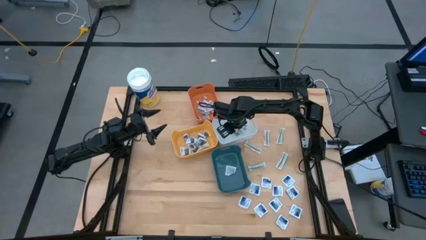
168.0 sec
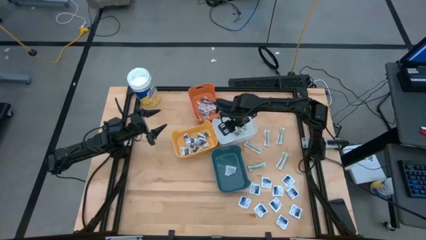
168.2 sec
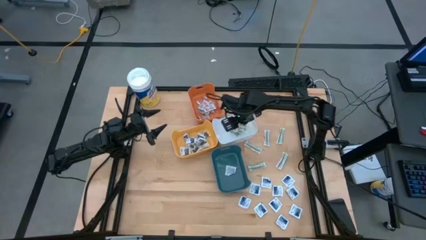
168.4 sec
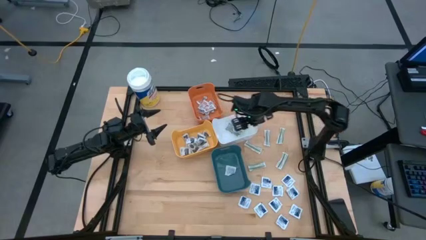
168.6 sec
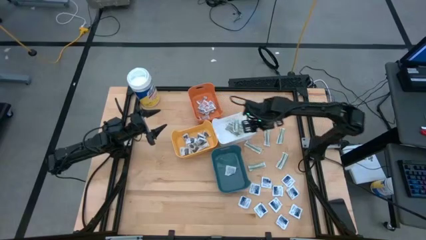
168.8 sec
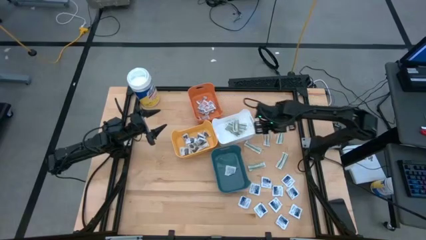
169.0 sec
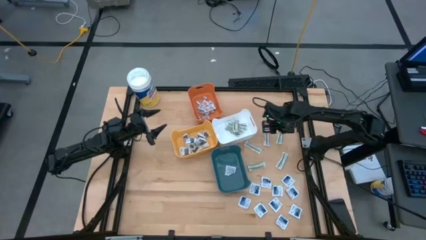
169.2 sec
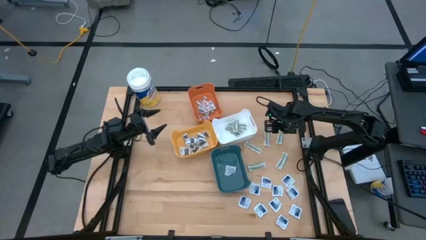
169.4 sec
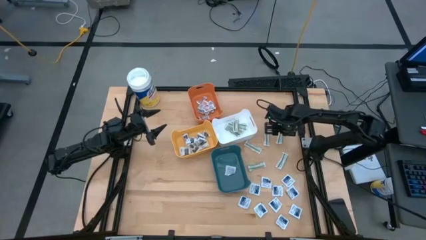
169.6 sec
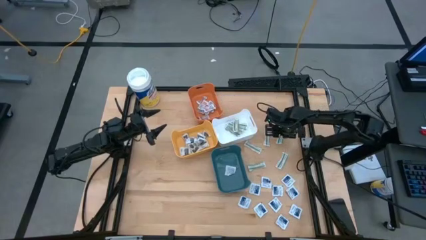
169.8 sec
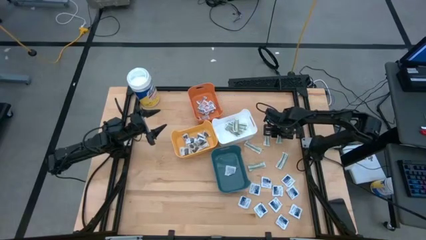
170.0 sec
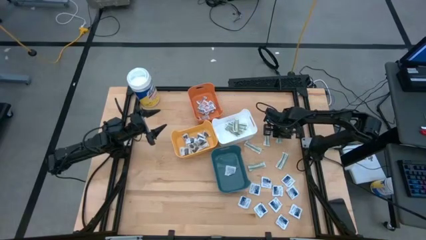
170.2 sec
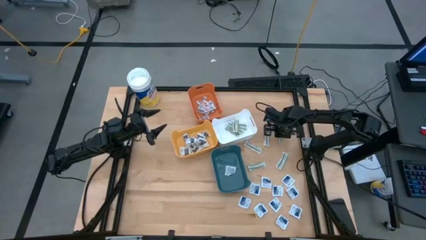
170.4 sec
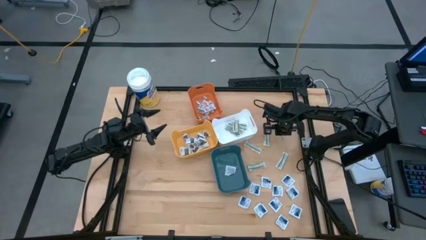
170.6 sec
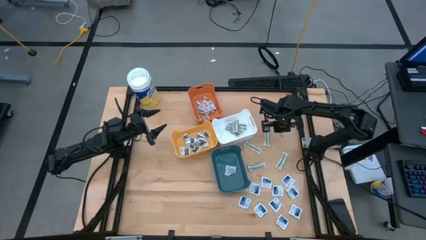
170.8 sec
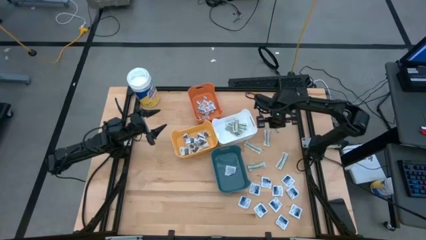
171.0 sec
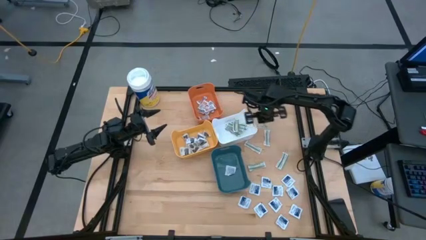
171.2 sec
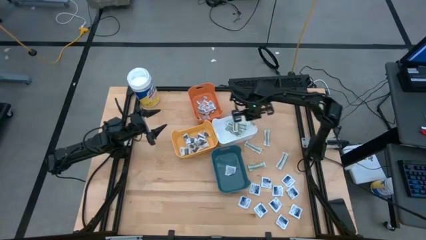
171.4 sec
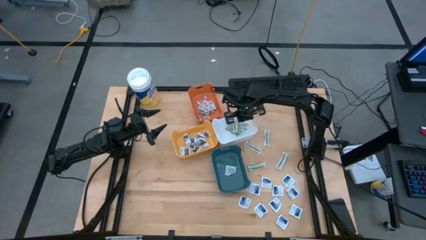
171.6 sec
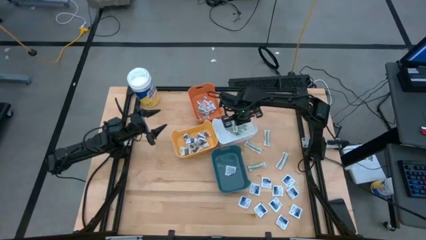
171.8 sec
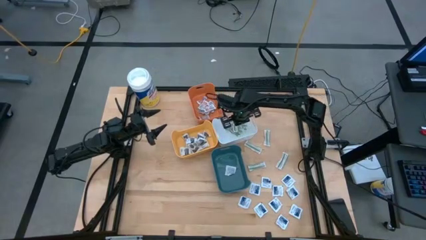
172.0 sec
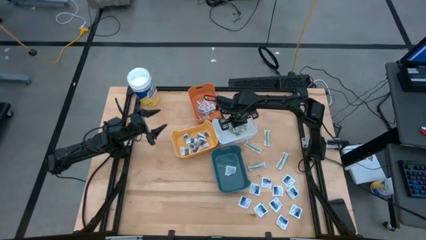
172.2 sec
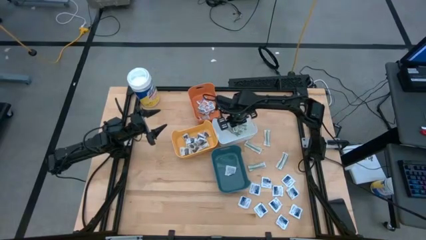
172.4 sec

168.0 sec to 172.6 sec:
Task: Pick & Place First Aid Supplies
Put the green bandage into the white bin

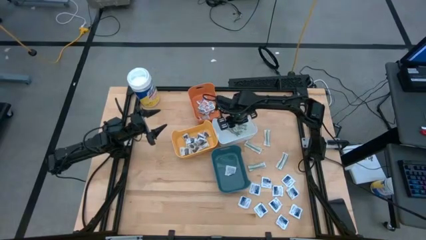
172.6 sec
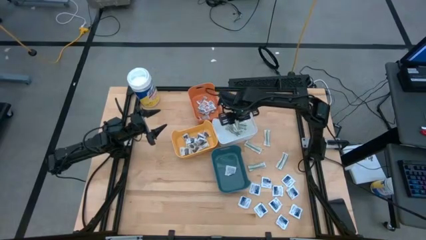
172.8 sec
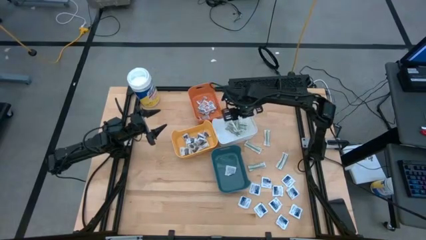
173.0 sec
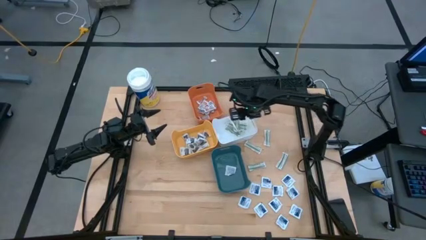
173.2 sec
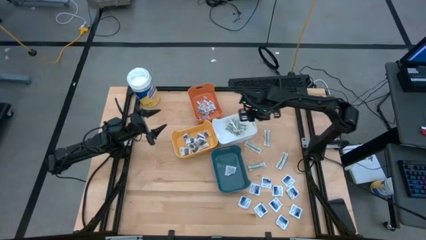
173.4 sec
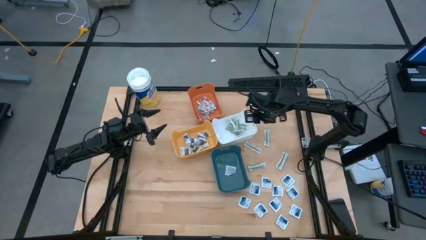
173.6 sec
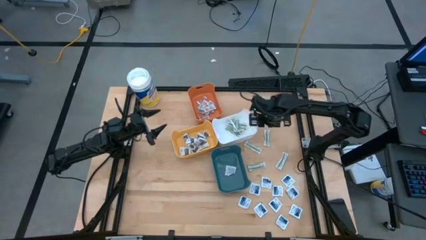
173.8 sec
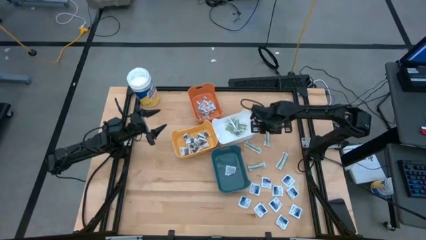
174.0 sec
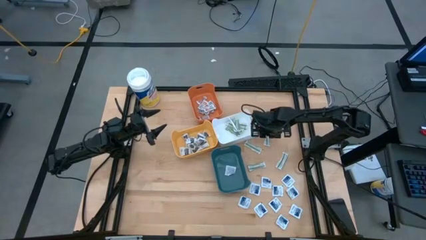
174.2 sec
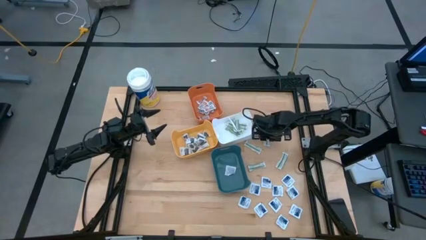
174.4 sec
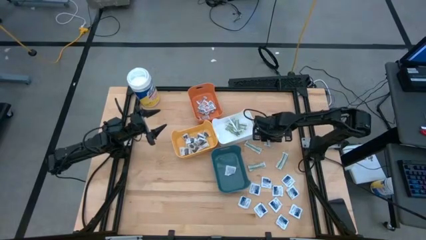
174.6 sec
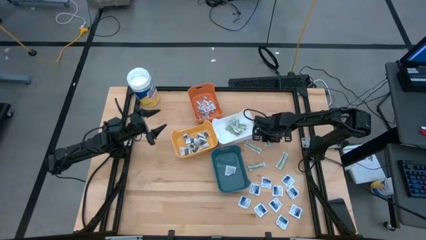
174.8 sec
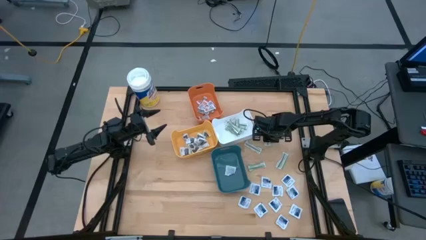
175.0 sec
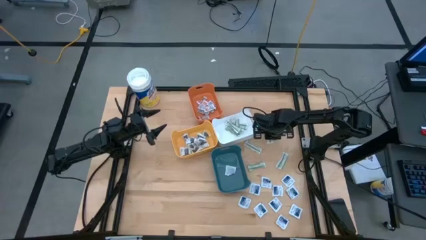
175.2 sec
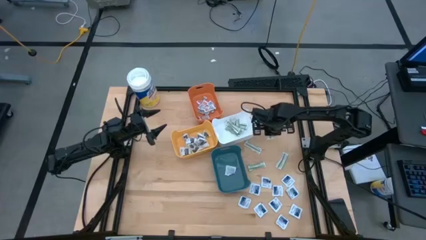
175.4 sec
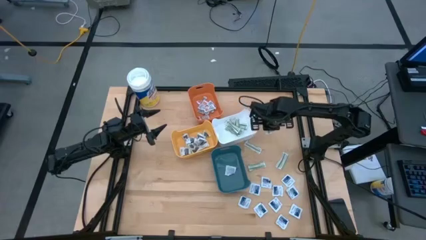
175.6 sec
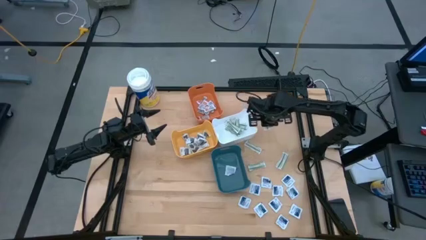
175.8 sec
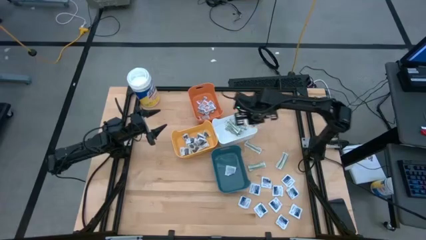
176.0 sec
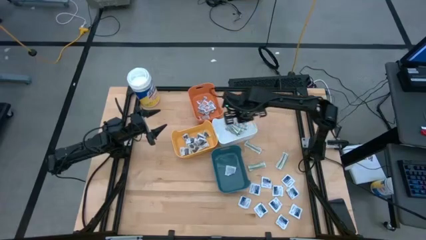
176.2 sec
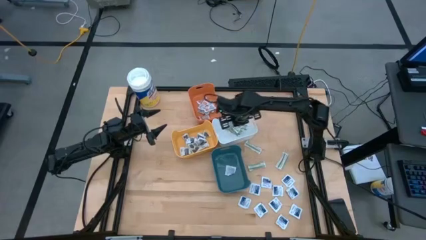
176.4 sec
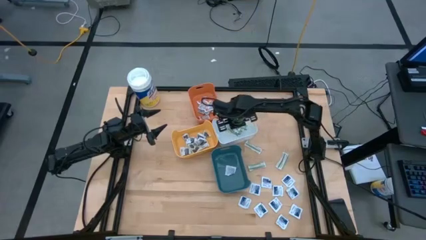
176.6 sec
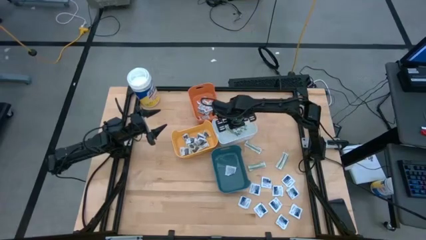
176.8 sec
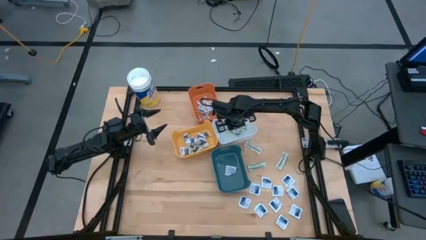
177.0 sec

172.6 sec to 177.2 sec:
Put the green bandage into the white bin

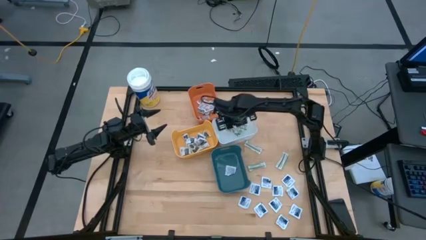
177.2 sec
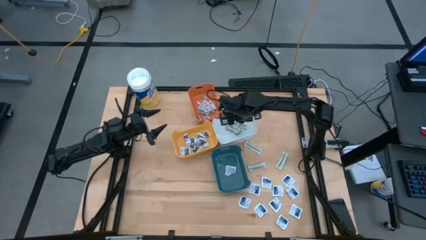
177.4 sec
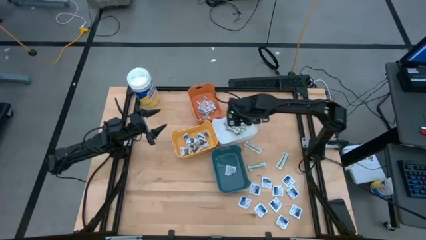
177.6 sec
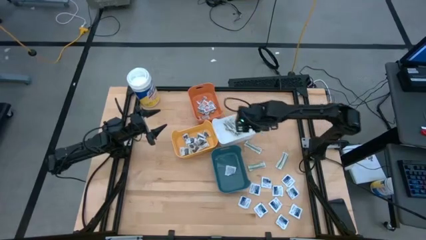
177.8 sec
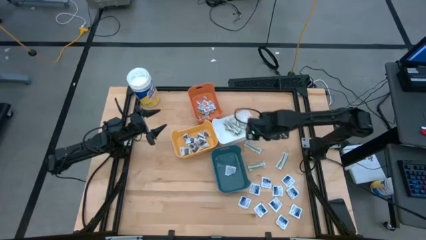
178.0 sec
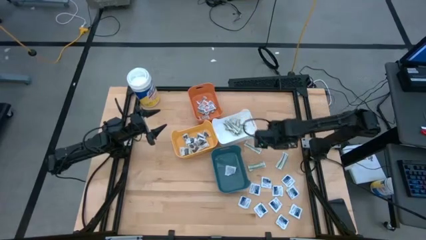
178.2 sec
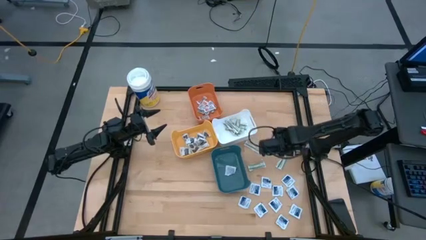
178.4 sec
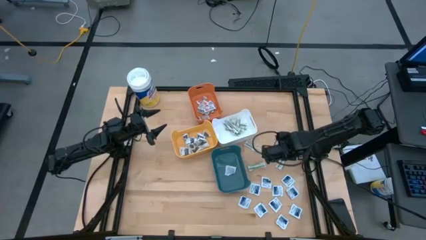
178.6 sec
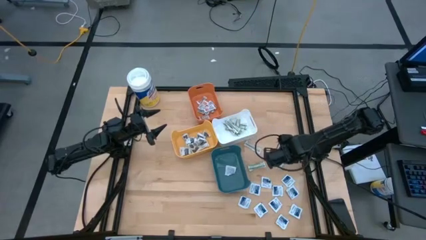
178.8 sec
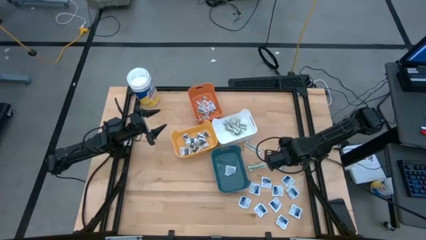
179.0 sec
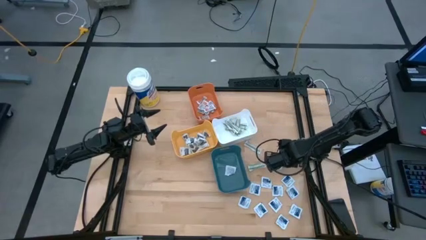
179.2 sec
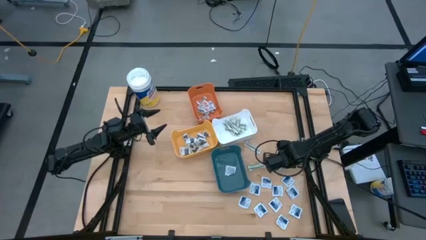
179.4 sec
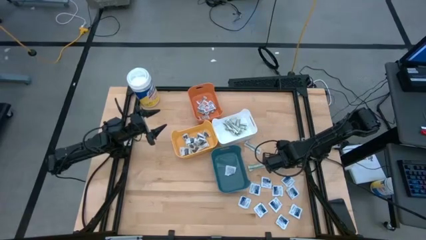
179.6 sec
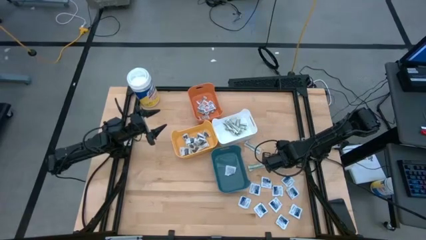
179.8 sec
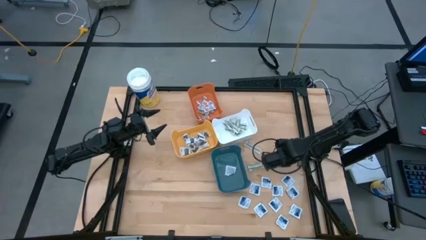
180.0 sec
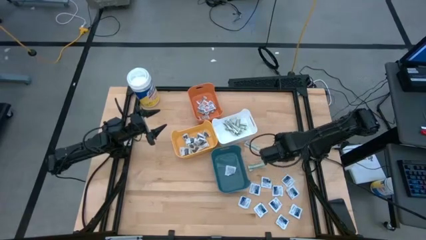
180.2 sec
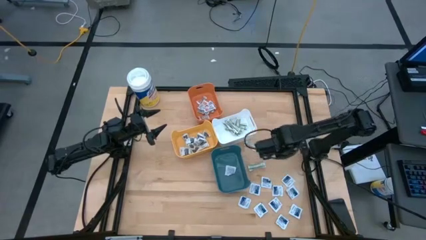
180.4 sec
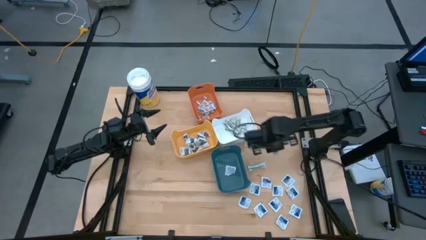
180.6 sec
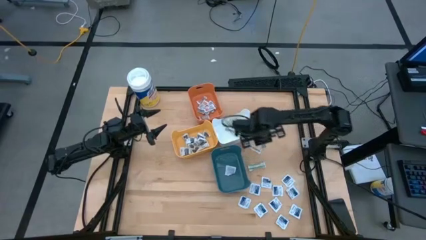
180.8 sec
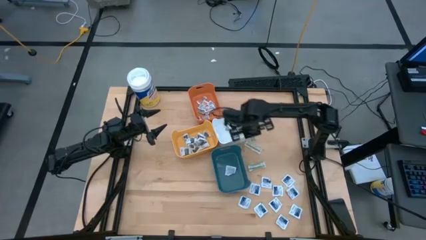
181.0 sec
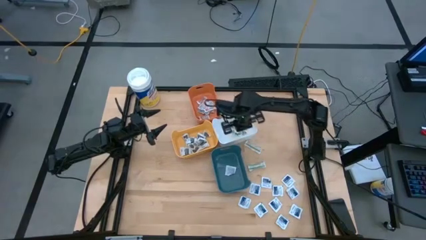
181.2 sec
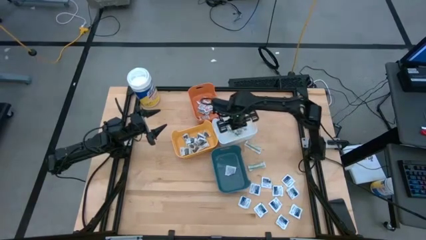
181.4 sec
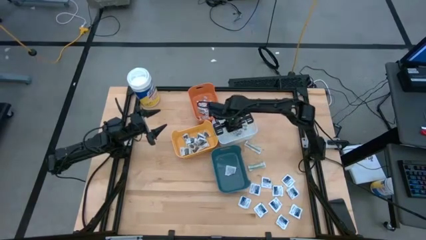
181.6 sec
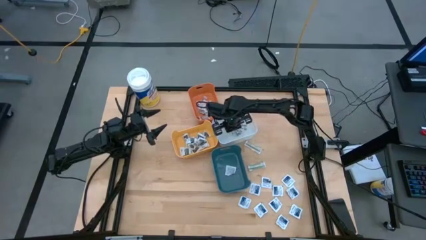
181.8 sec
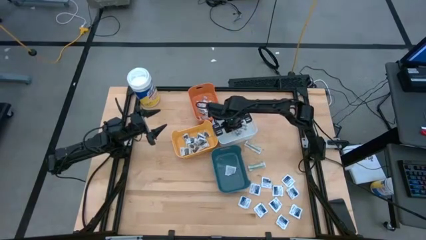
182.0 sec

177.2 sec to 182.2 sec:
Put the green bandage into the white bin

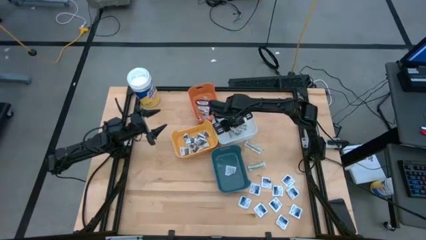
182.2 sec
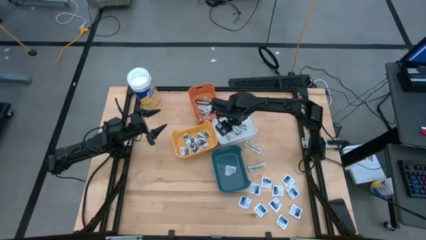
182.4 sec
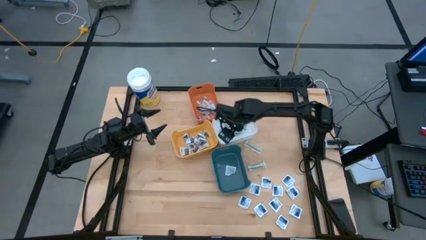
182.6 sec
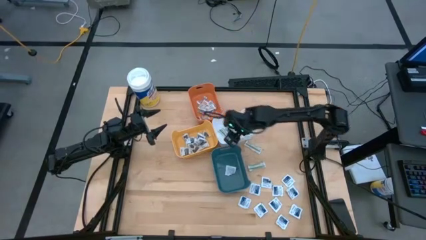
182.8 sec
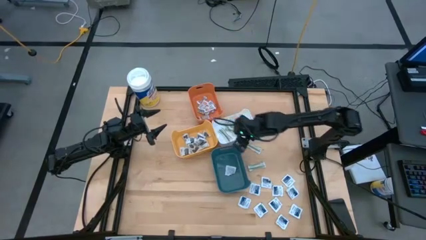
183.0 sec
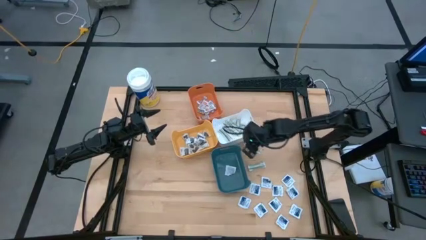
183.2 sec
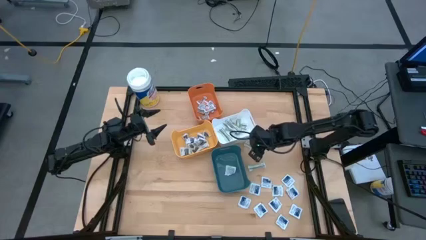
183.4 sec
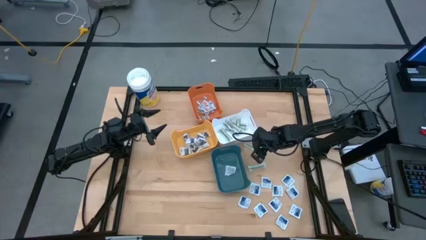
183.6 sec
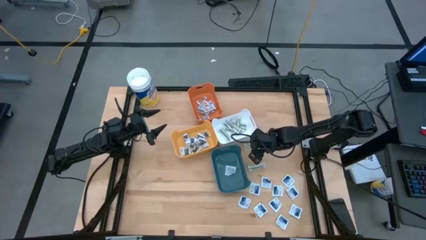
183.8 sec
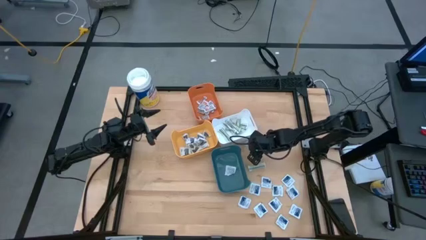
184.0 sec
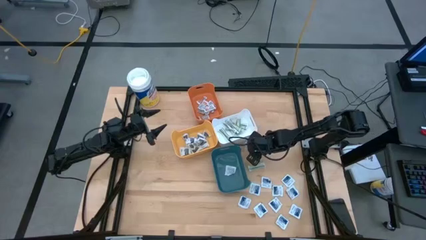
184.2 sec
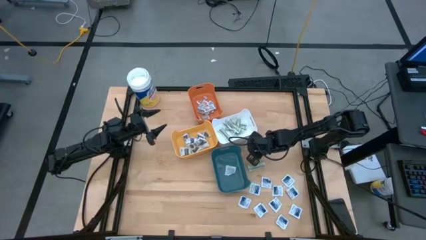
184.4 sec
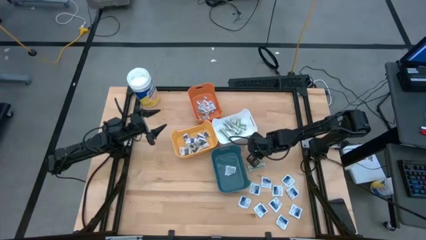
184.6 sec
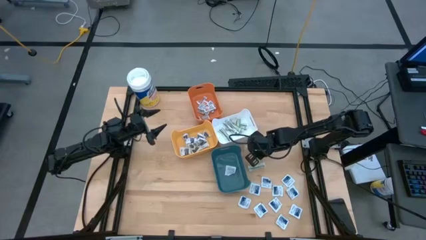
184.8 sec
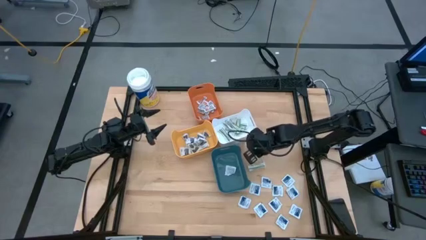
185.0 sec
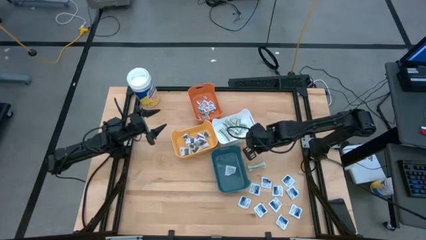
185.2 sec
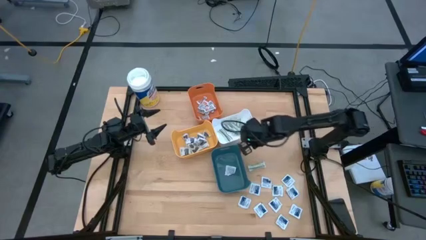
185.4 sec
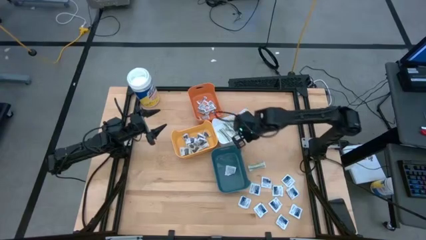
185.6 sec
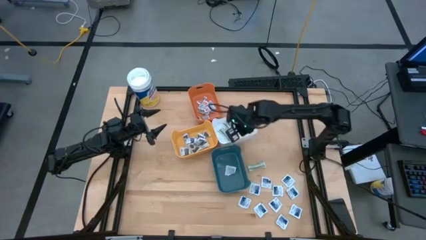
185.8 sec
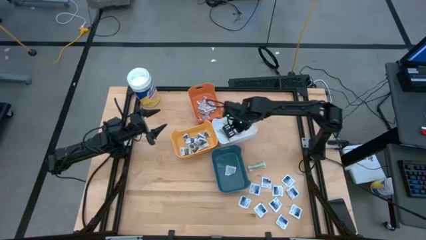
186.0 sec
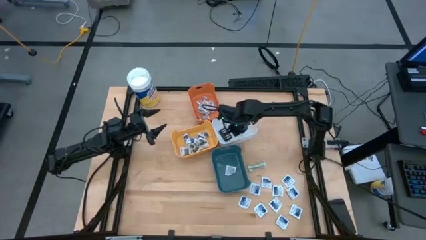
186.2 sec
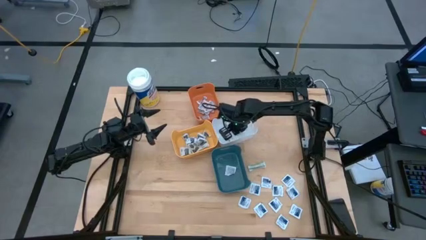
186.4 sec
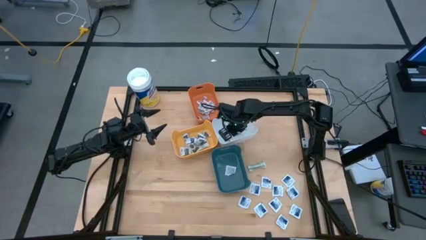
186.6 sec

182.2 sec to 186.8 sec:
Put the green bandage into the white bin
